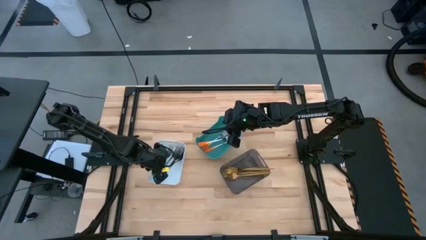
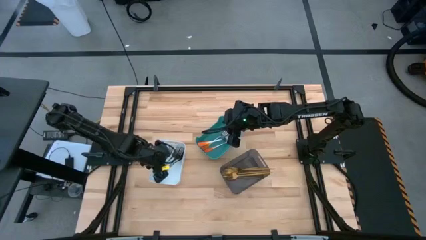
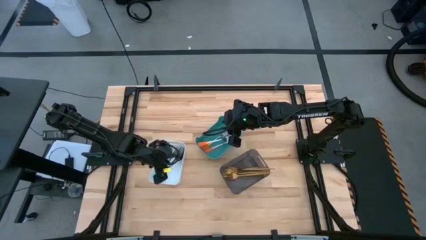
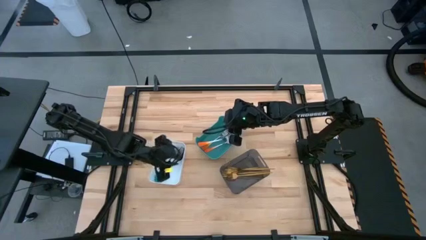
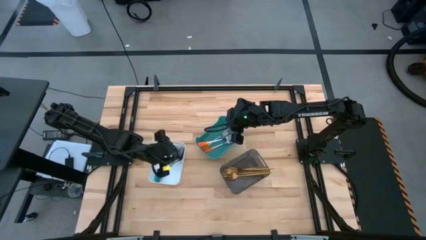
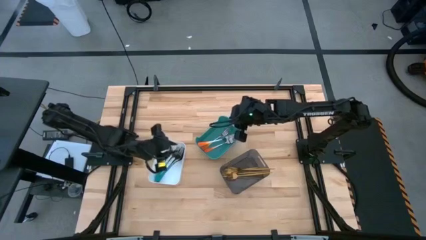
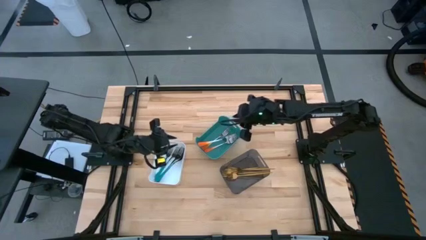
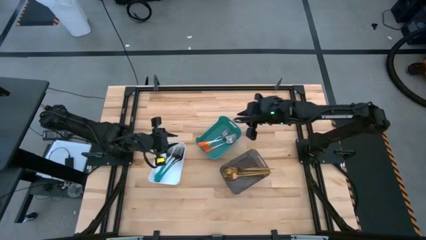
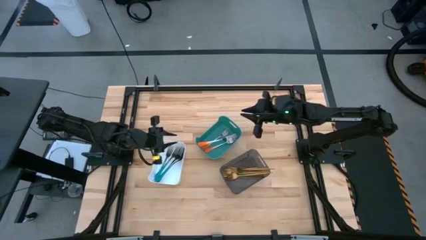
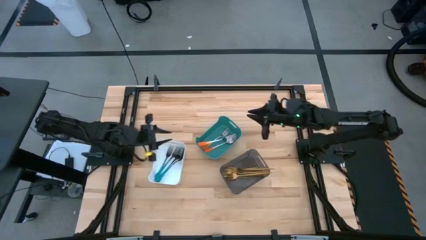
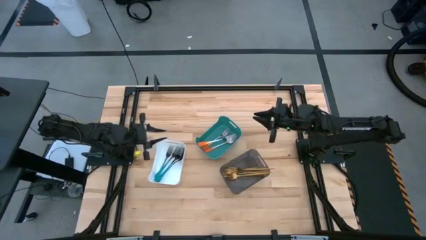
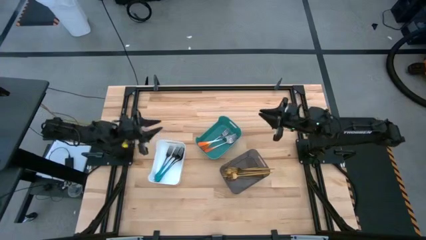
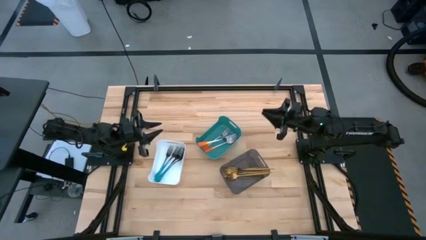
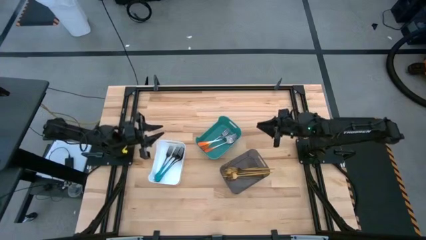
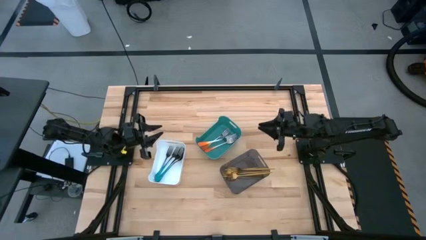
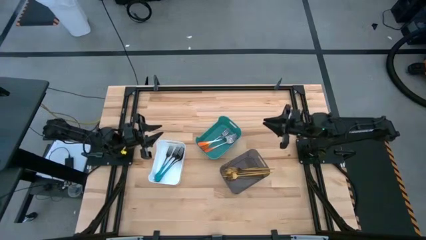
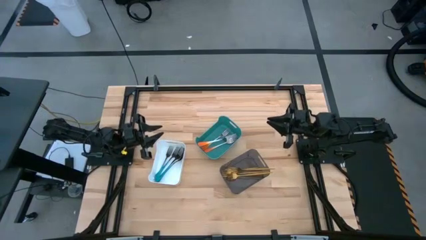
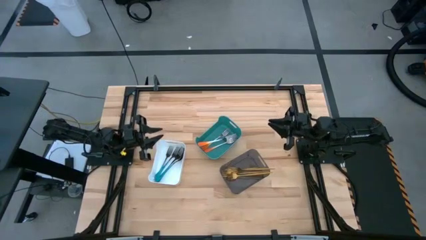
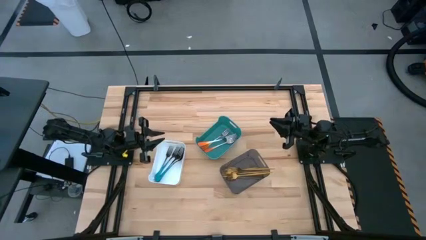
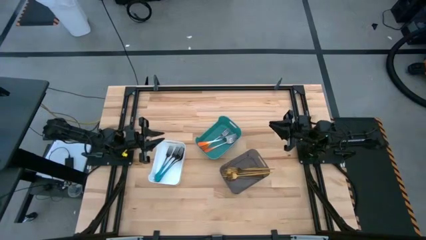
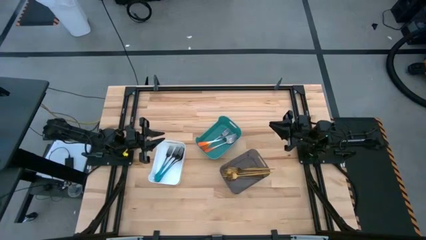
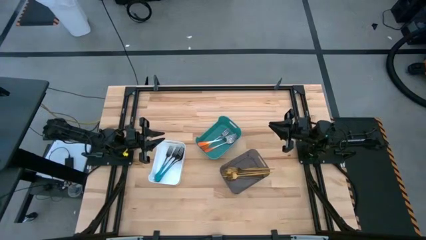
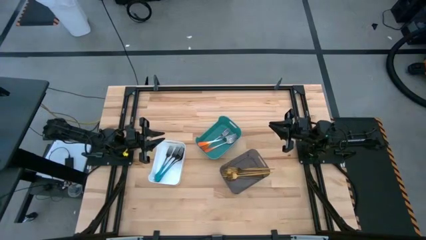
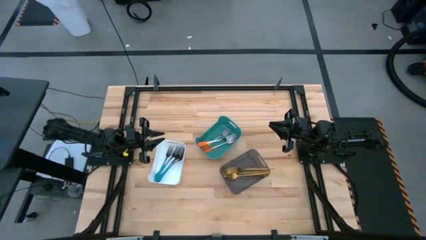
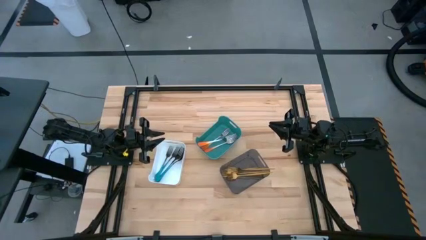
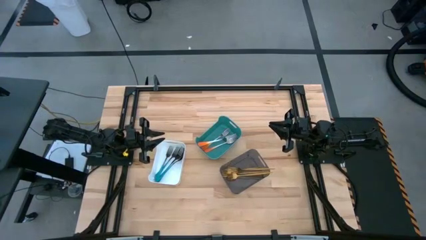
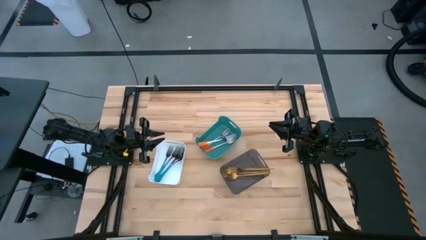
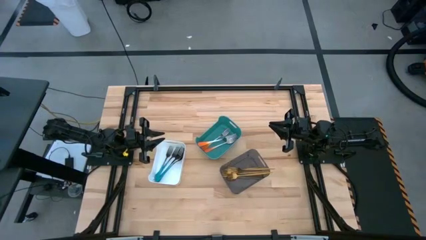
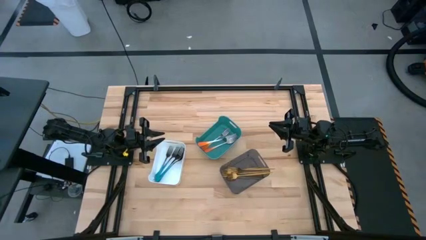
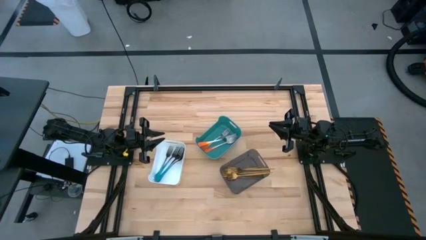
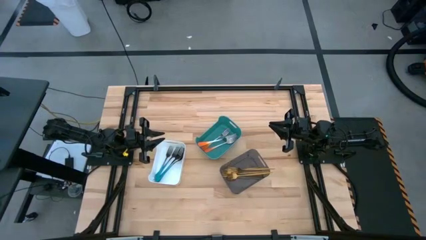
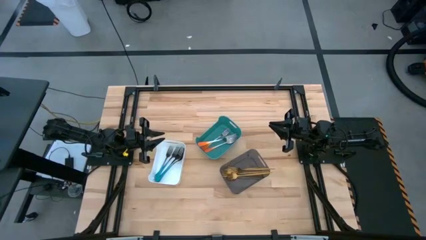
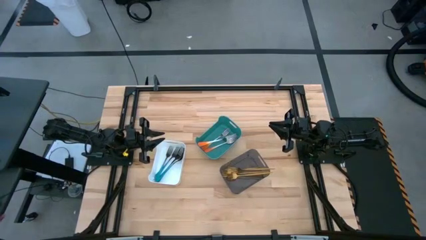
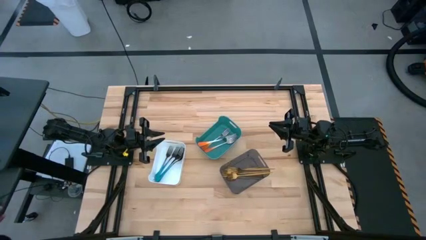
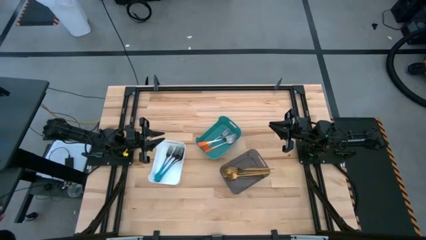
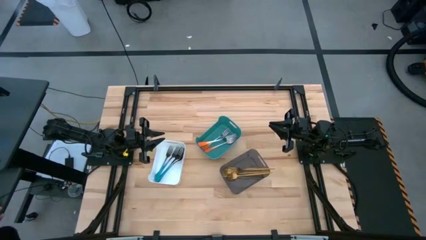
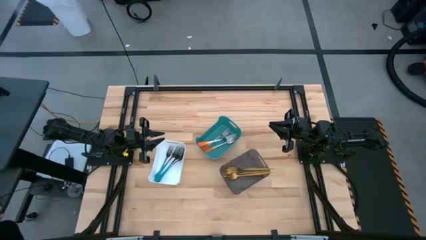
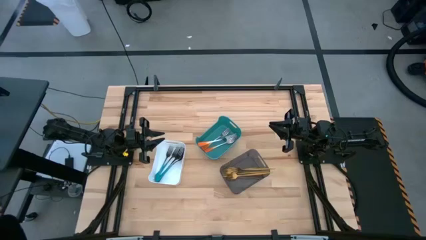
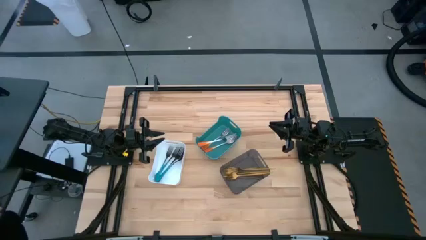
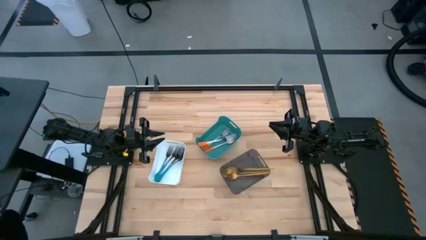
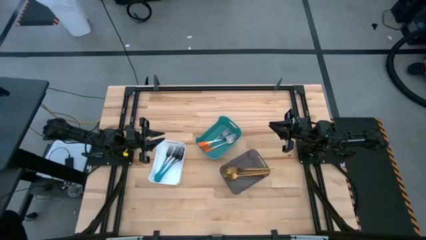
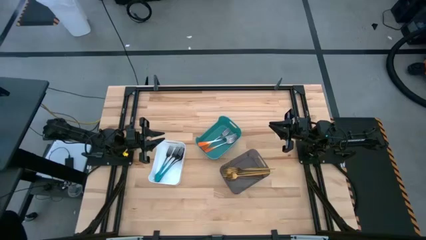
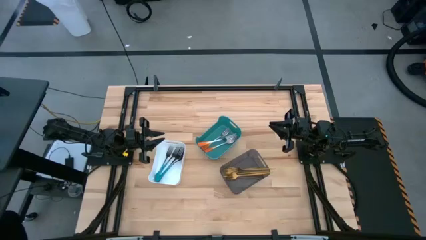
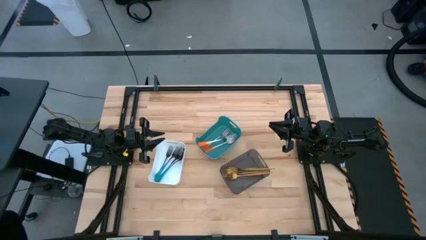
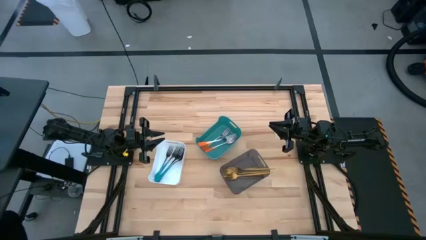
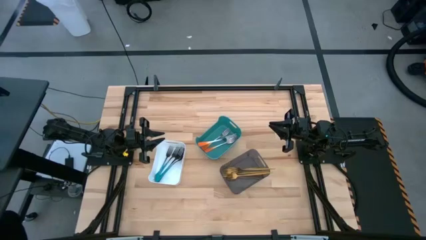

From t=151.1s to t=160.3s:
Task: Sort silverware by color (type)
Return to Home Position

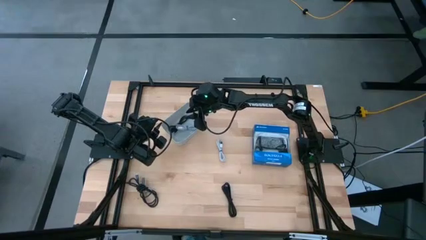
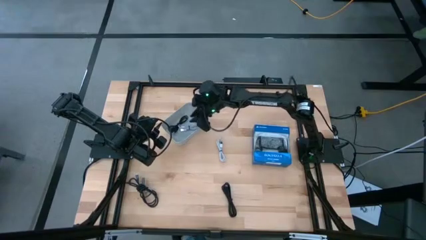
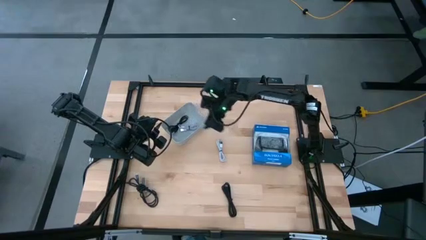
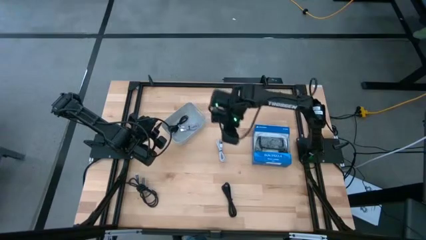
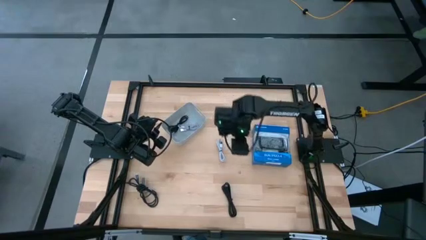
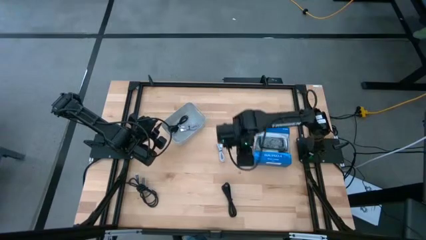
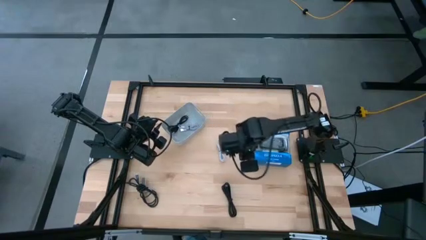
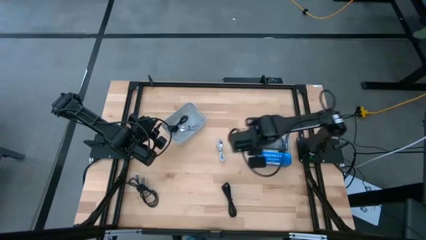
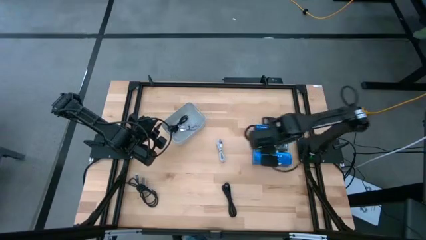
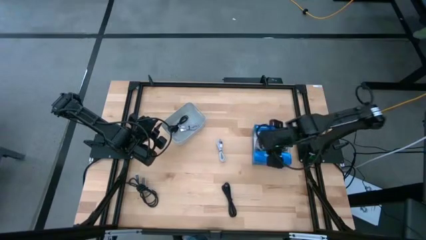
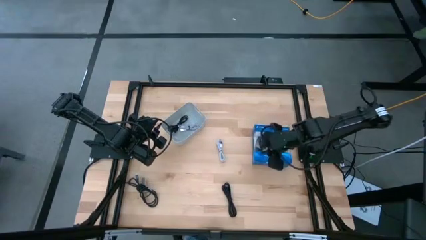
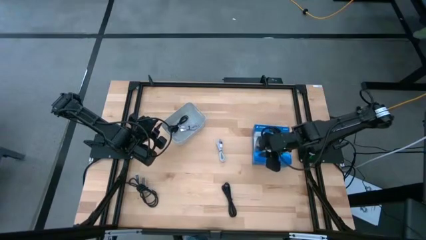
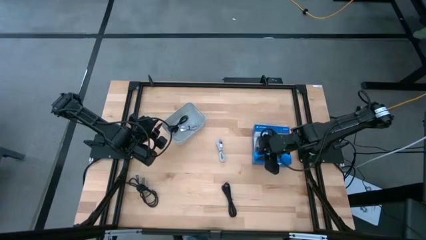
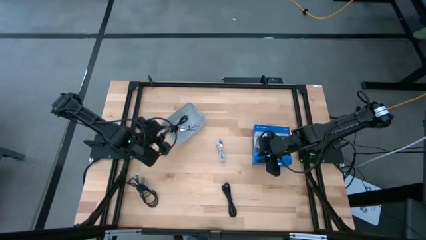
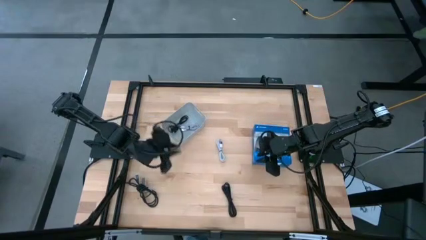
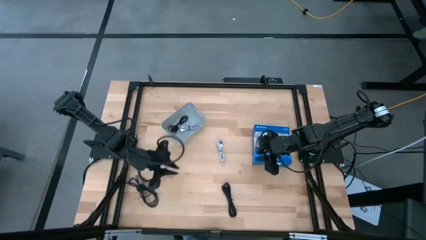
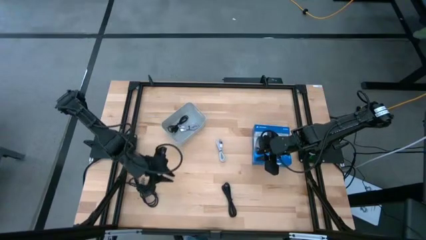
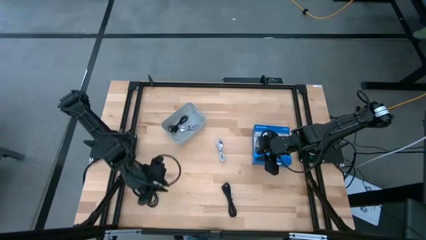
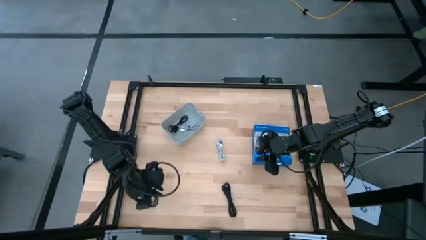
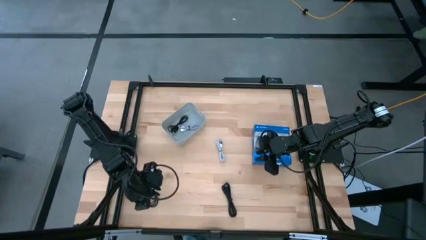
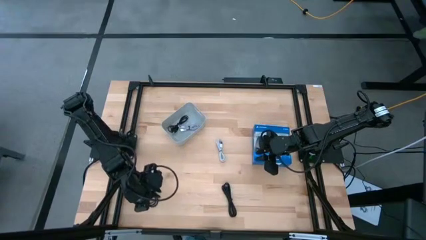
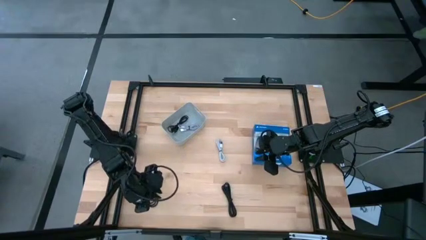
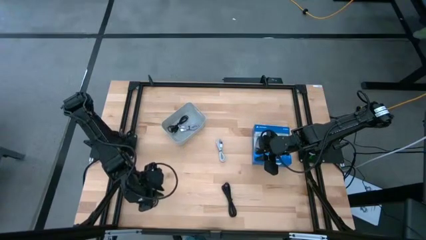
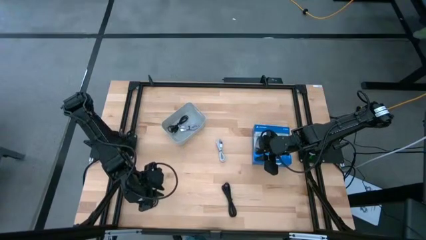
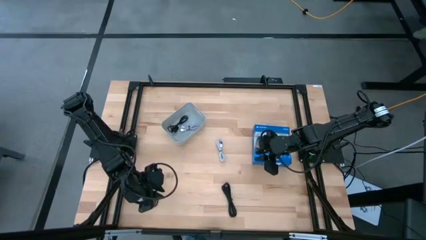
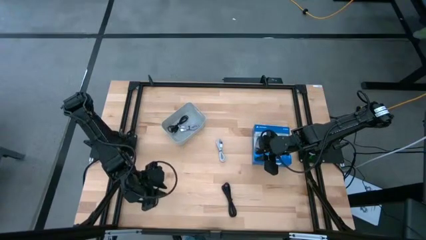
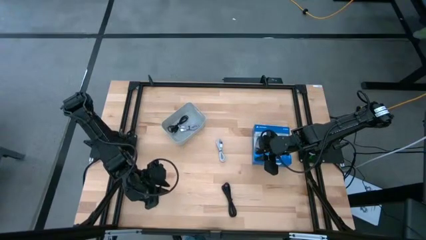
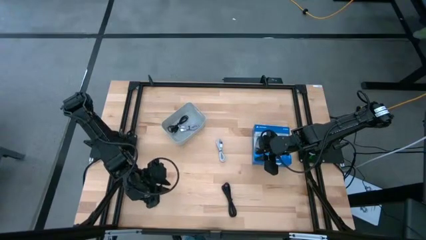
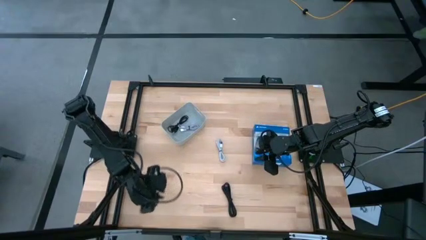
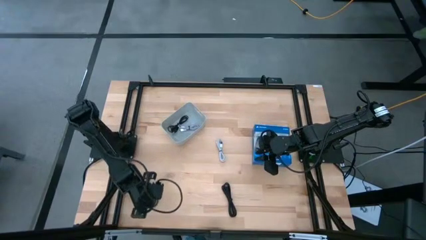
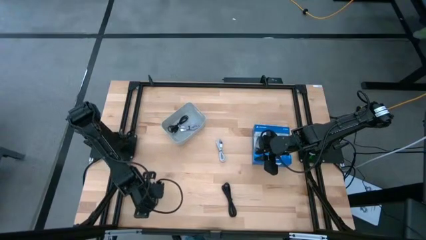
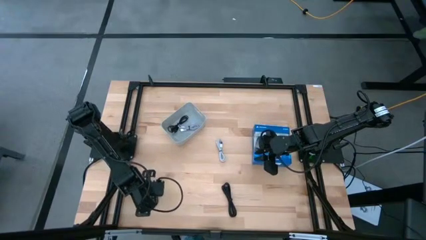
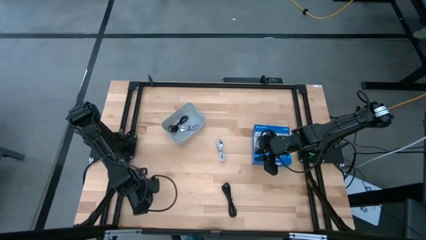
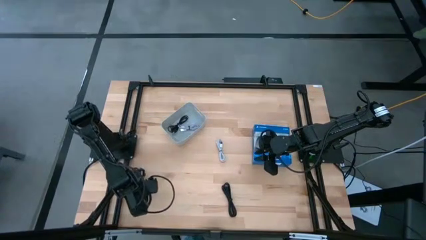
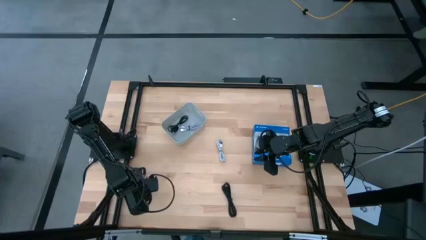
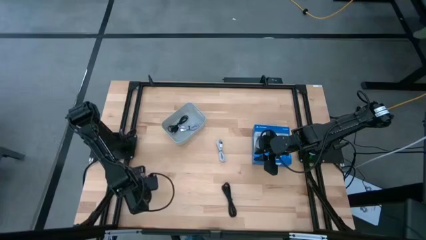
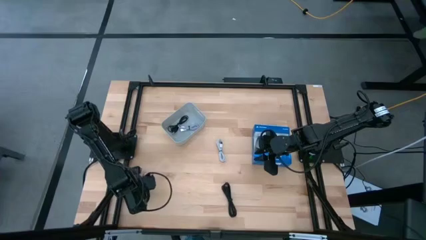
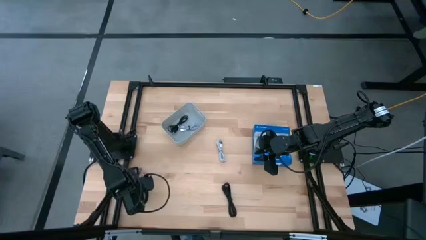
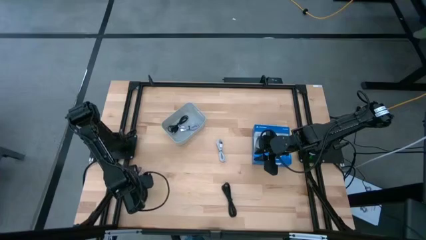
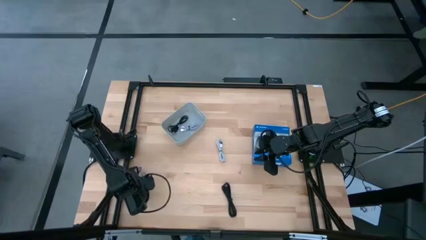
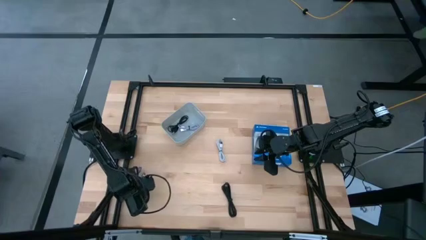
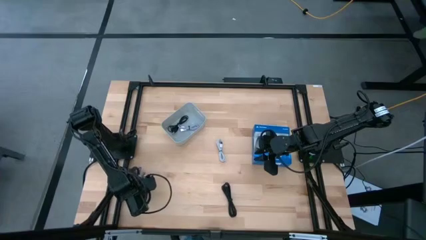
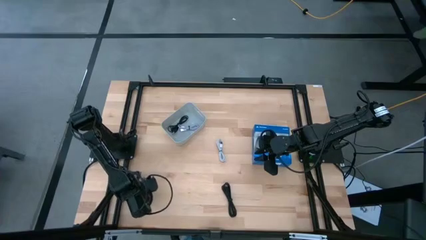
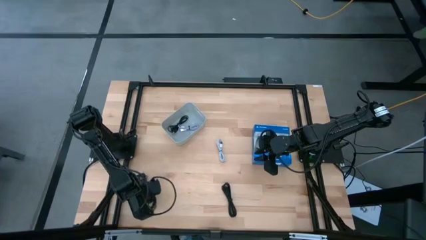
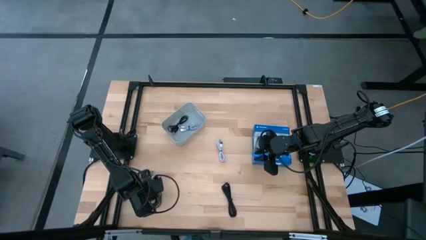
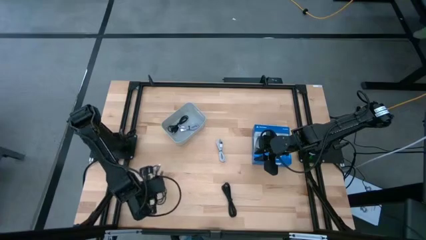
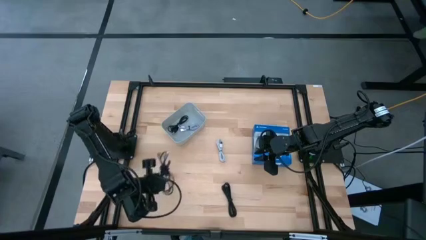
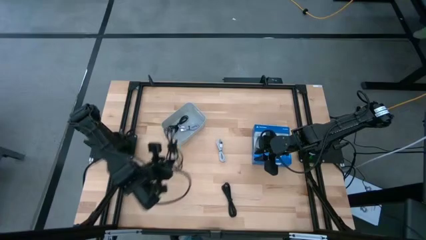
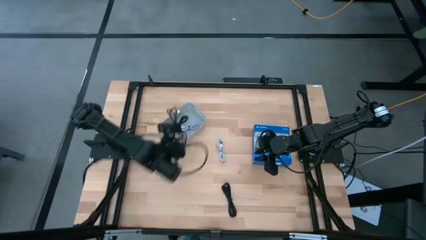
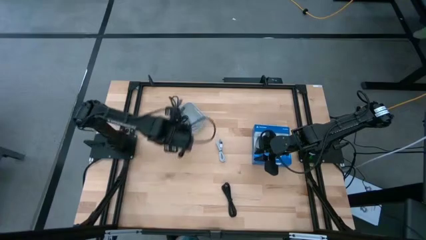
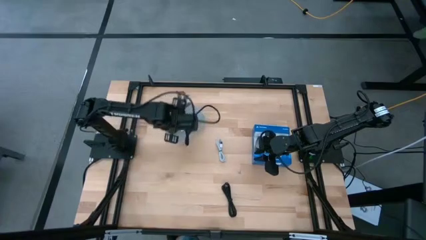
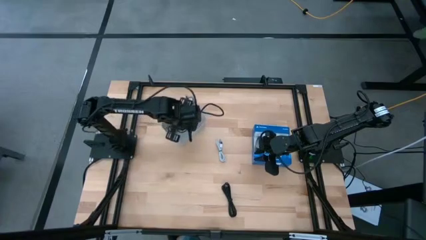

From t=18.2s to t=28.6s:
Task: Pick and place USB-C Cables
Put the black gray charger cable into the white bin
